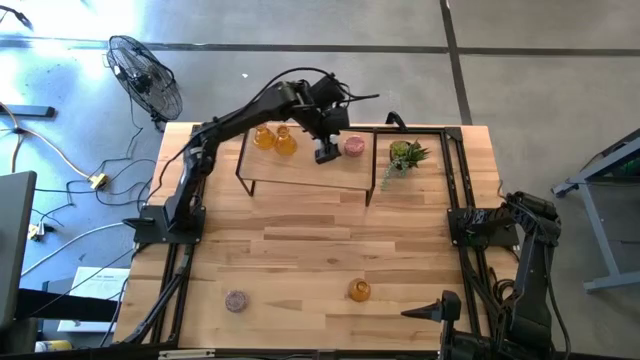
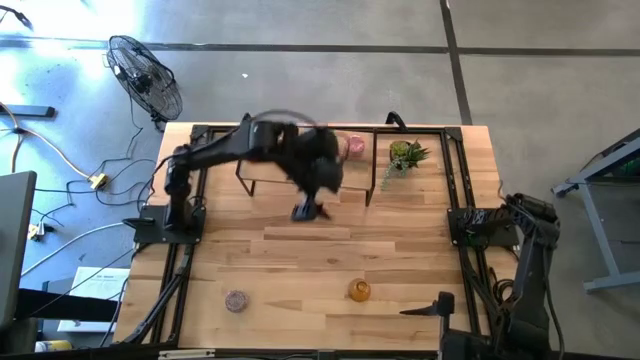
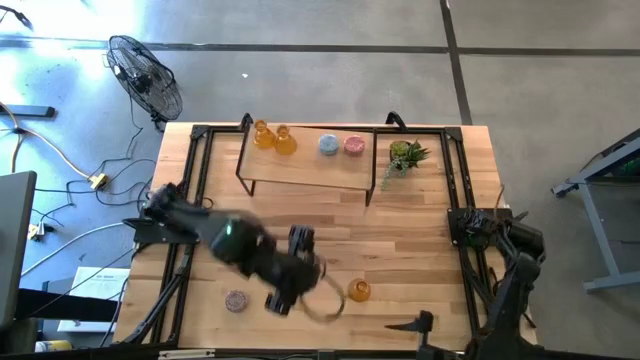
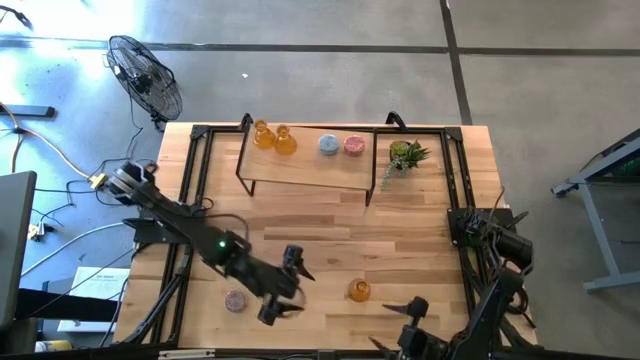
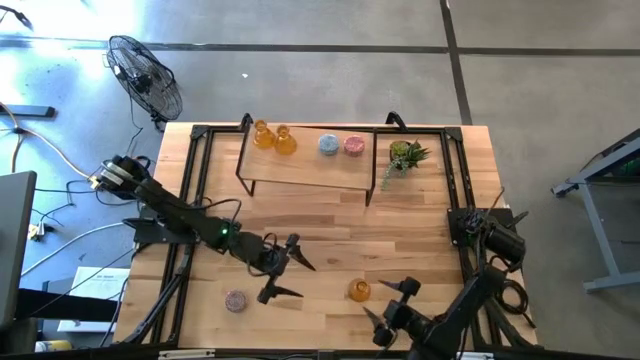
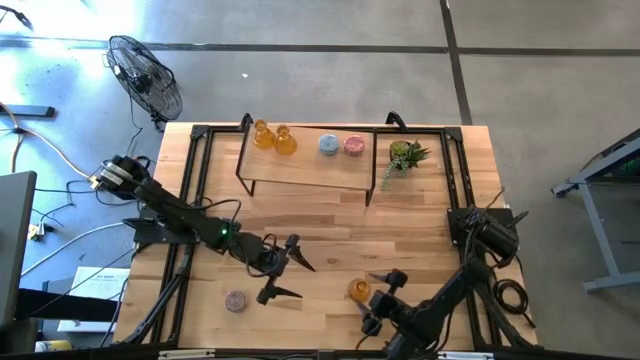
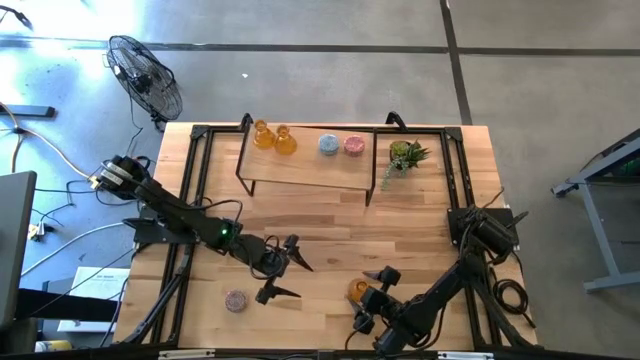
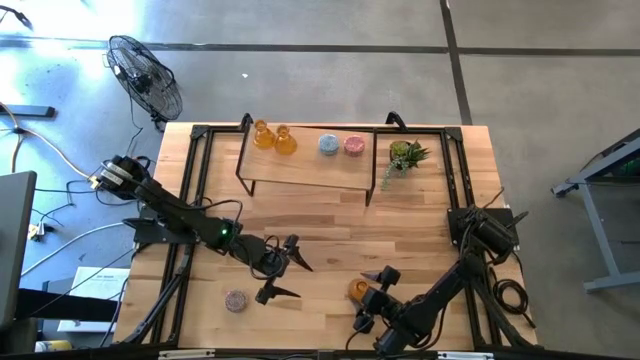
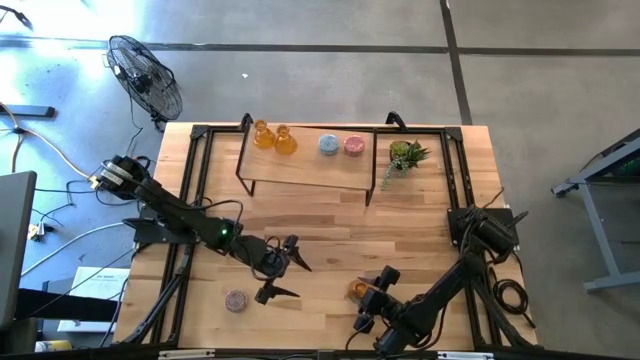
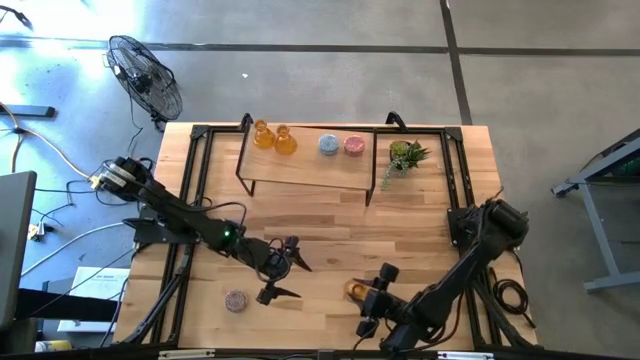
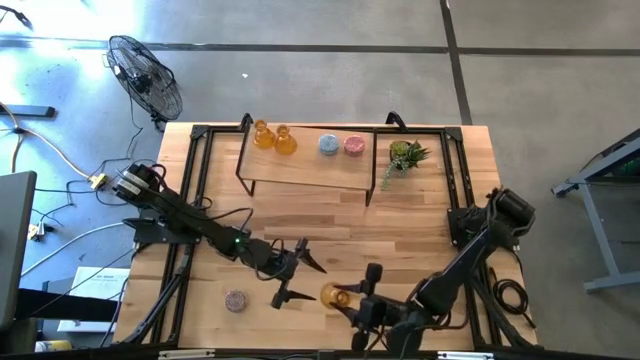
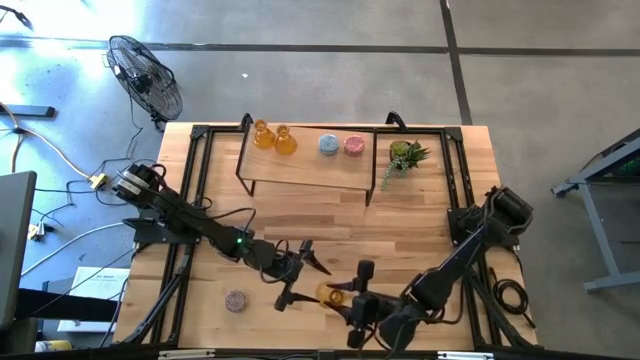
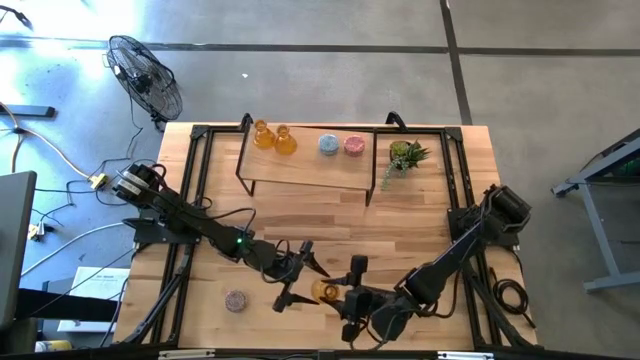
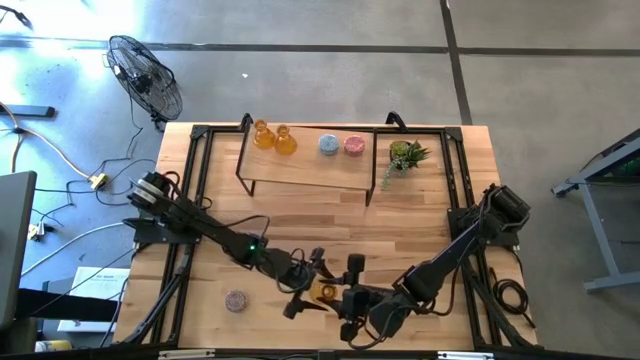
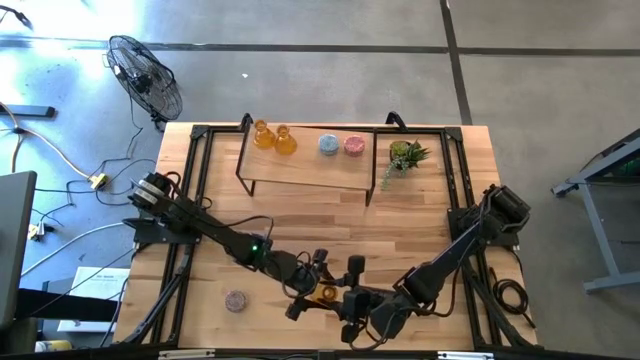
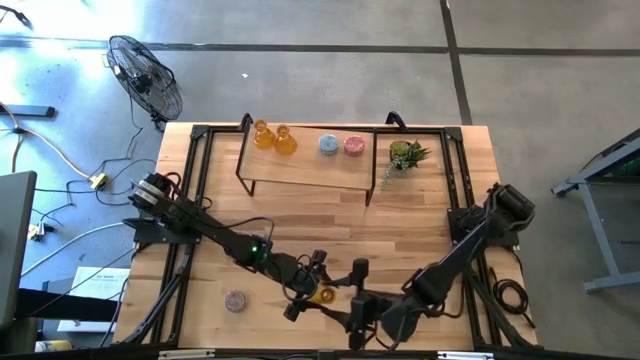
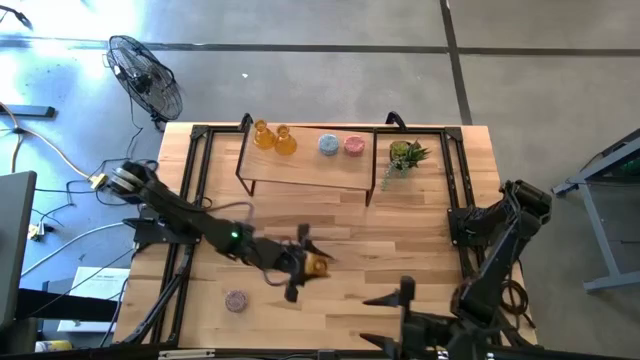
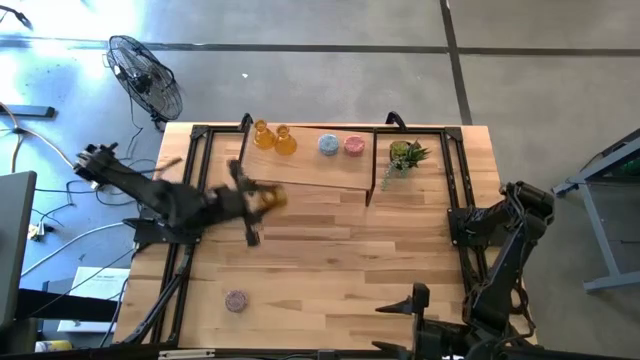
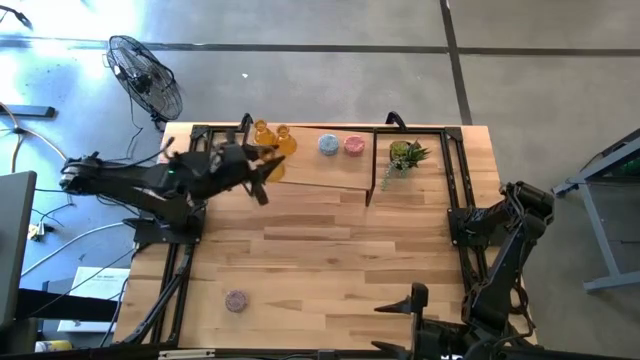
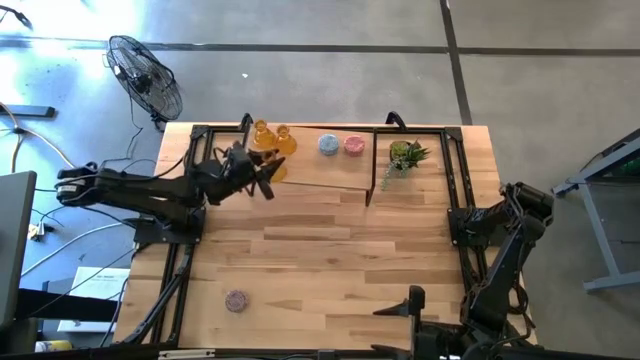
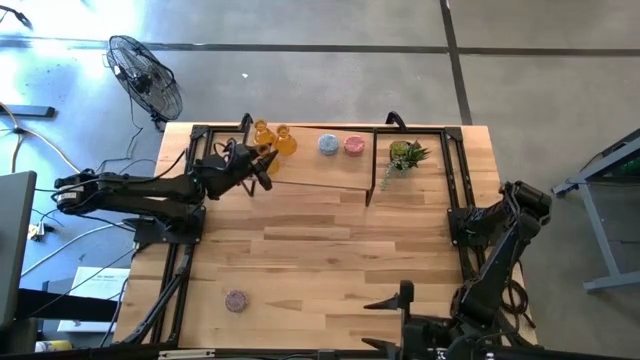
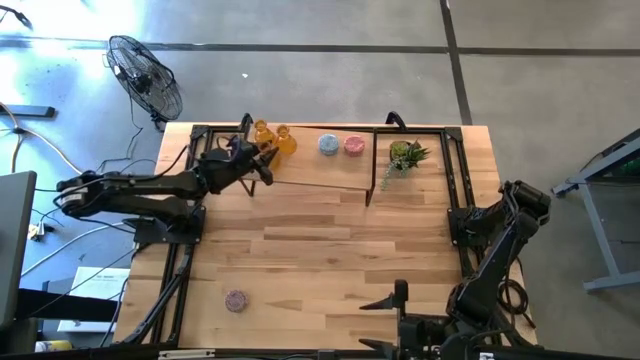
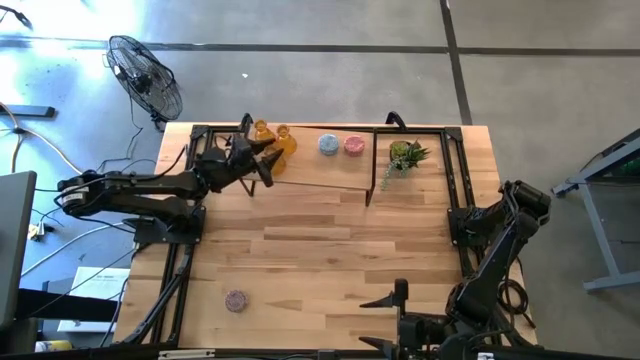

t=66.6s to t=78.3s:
Task: Pick & Place candle stick holders
Put the yellow candle holder on the shelf

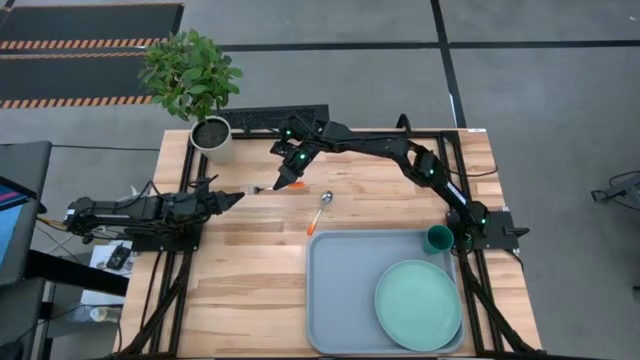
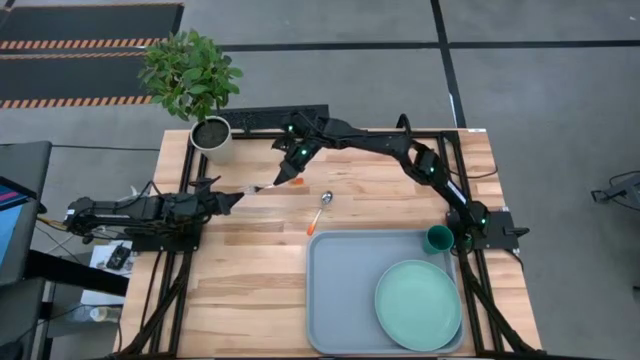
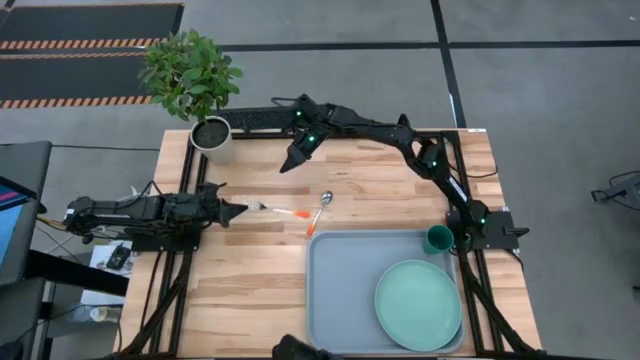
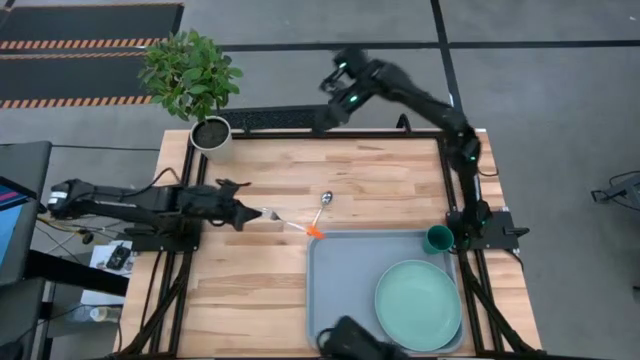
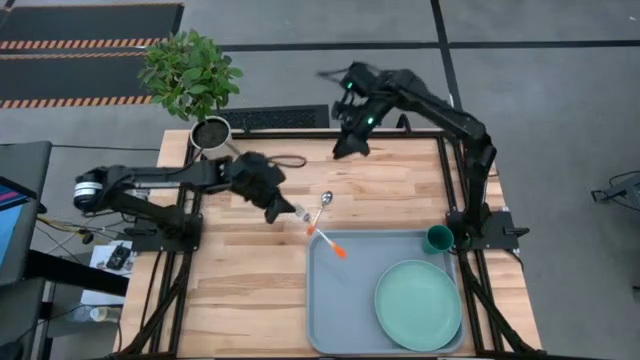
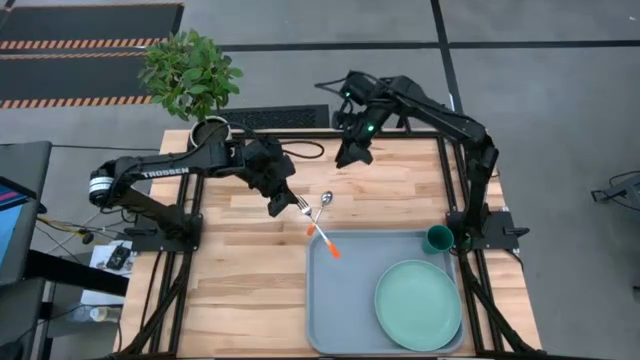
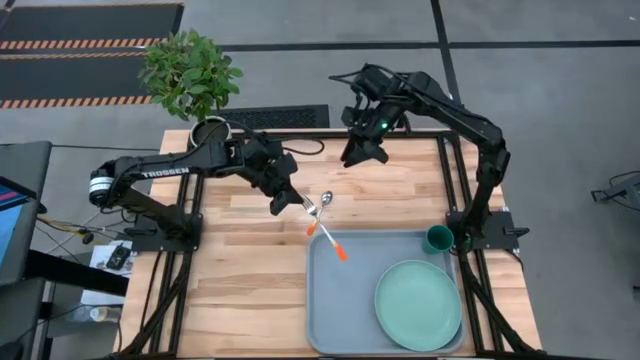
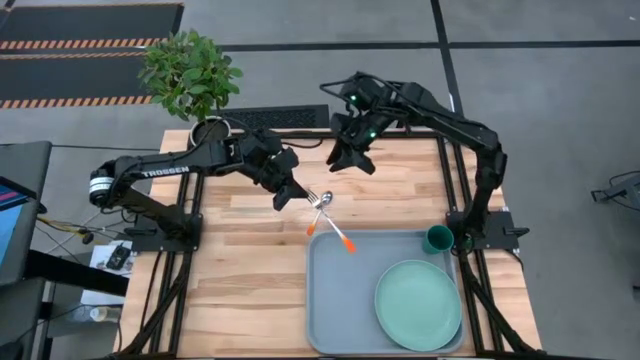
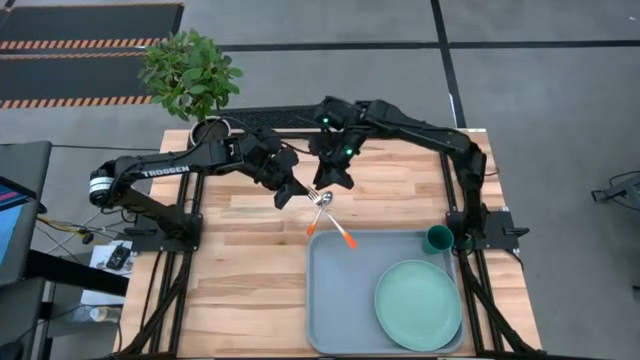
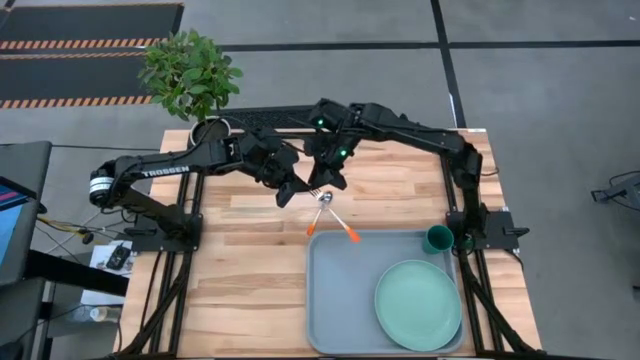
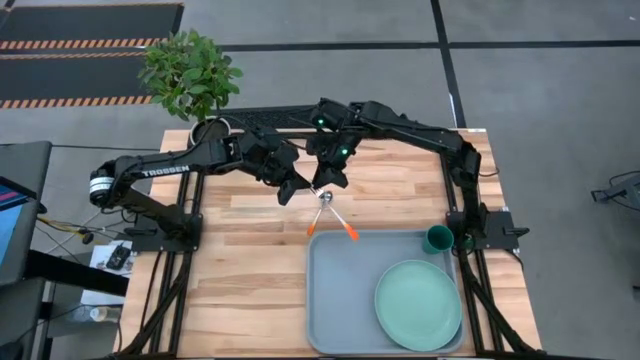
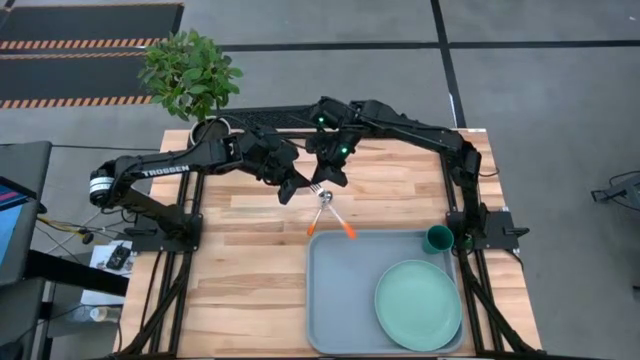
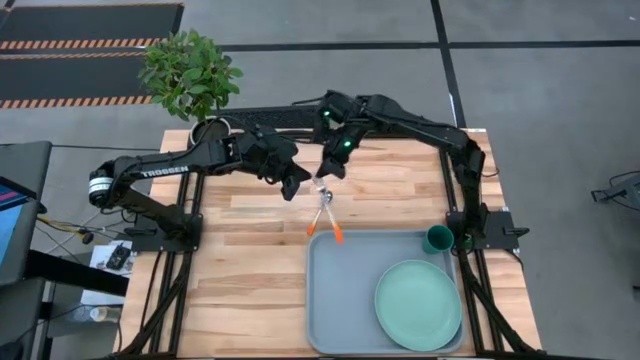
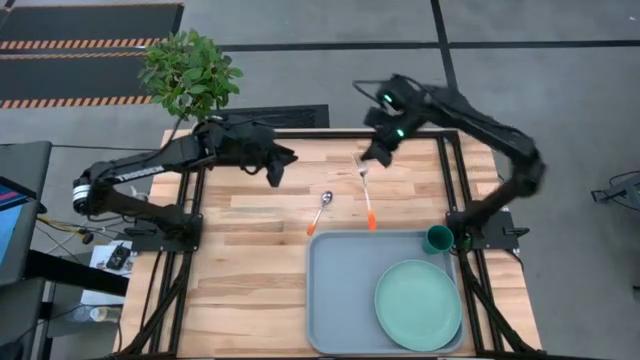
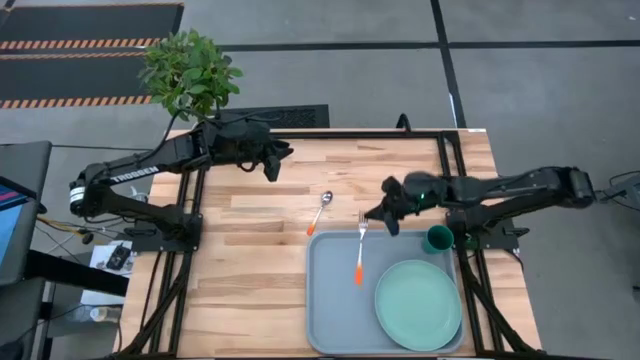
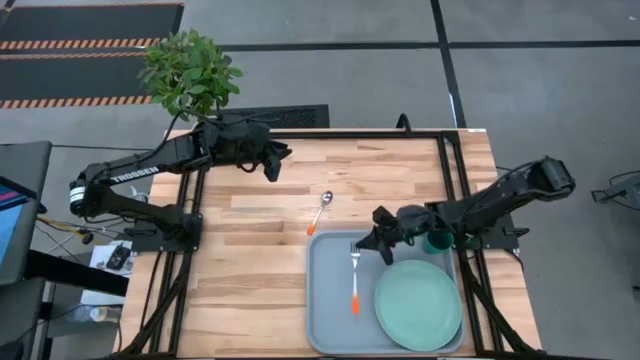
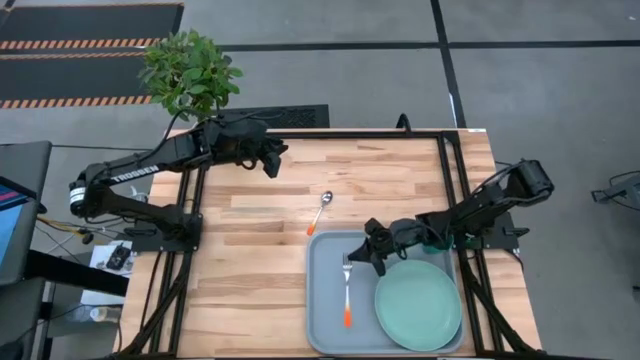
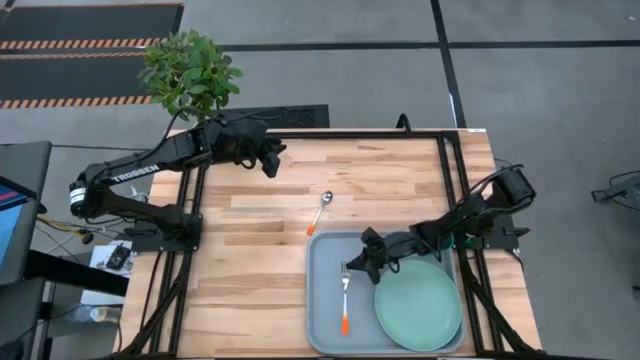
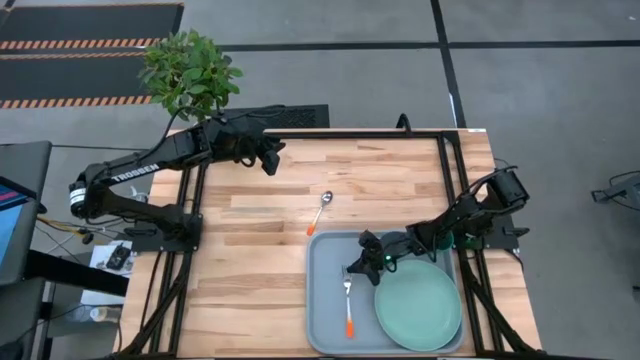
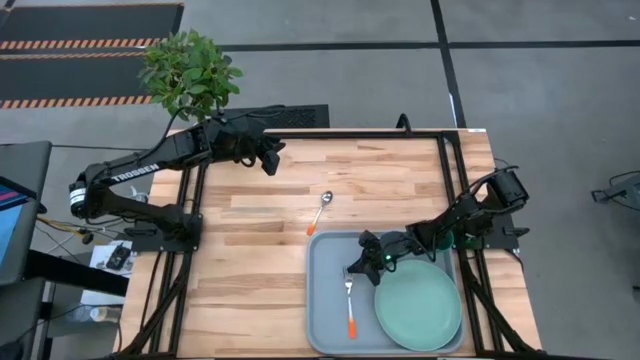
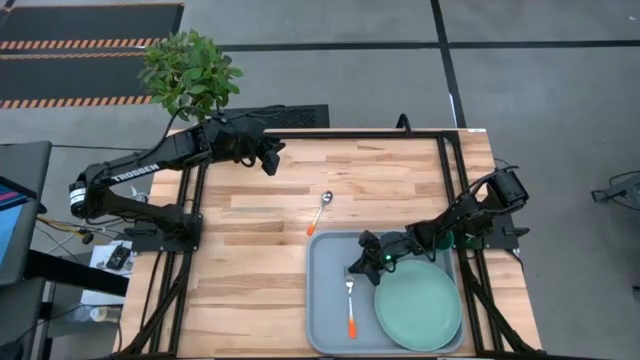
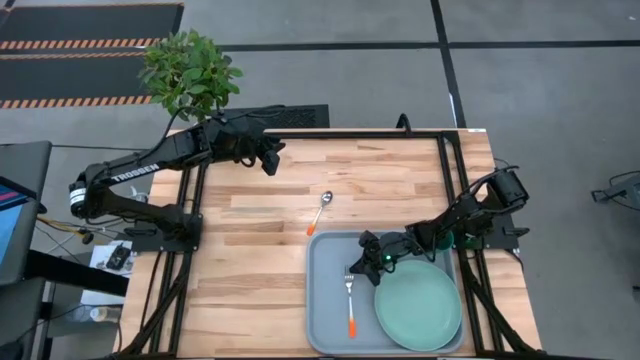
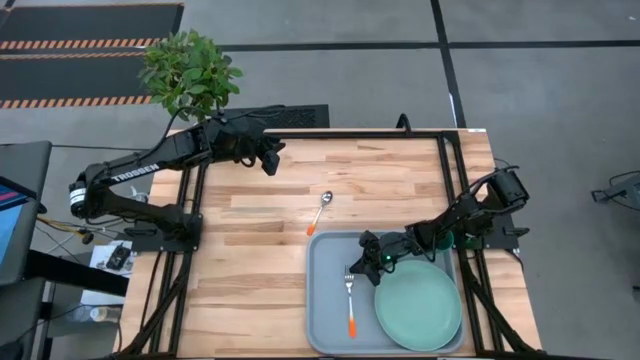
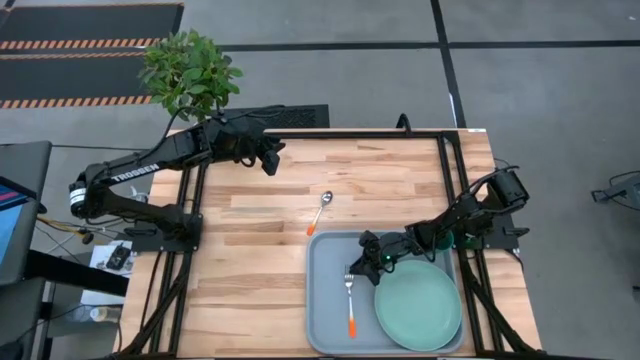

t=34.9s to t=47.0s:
Task: Pick and place plate/cup/fork/spoon on tray
Put the orange fork on the left of the light blue plate on the blue serving tray
